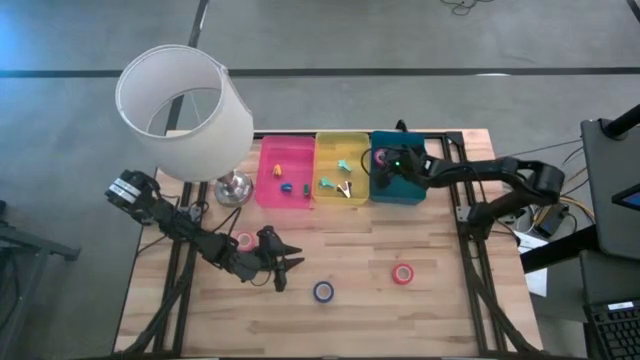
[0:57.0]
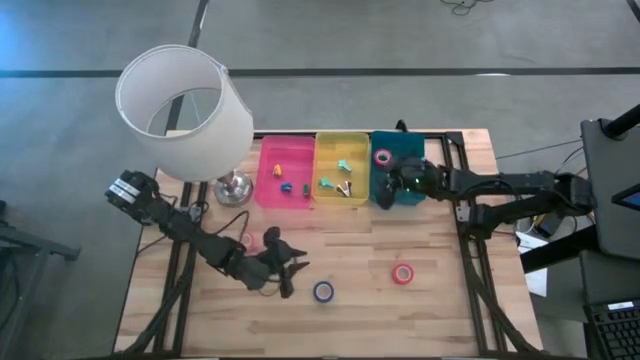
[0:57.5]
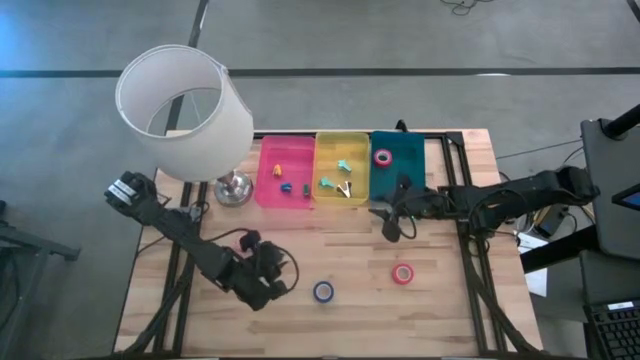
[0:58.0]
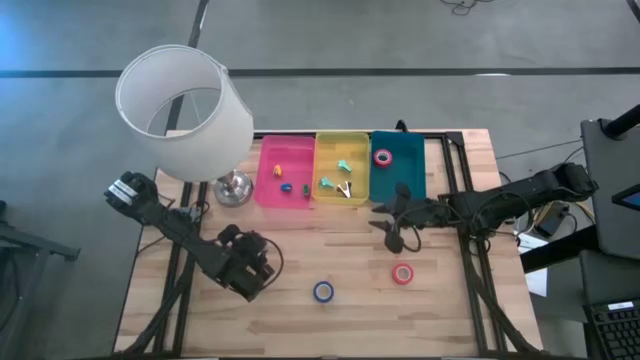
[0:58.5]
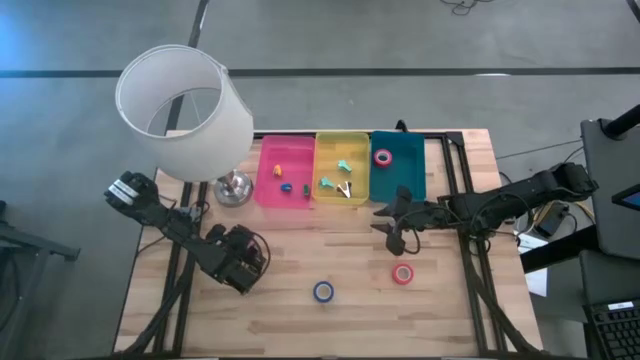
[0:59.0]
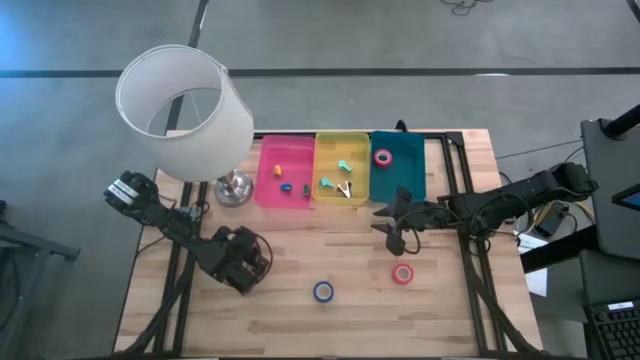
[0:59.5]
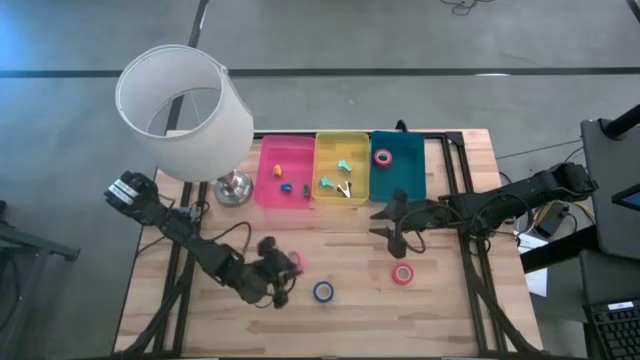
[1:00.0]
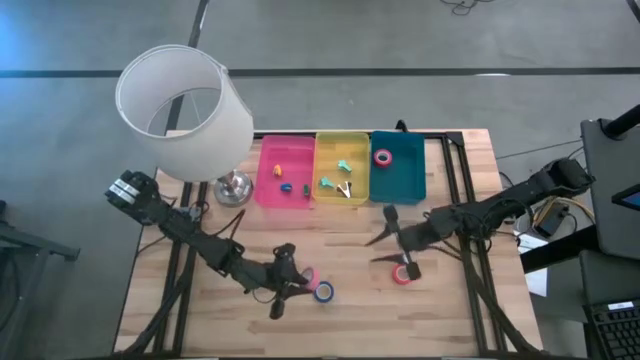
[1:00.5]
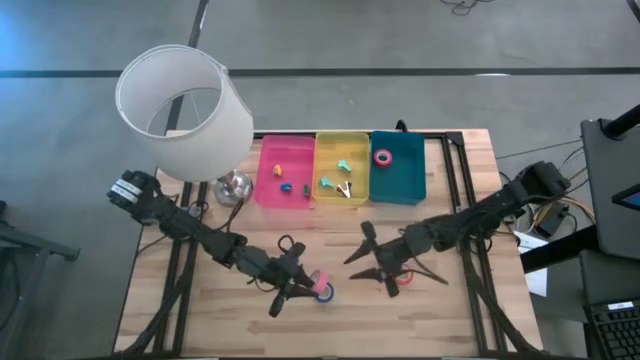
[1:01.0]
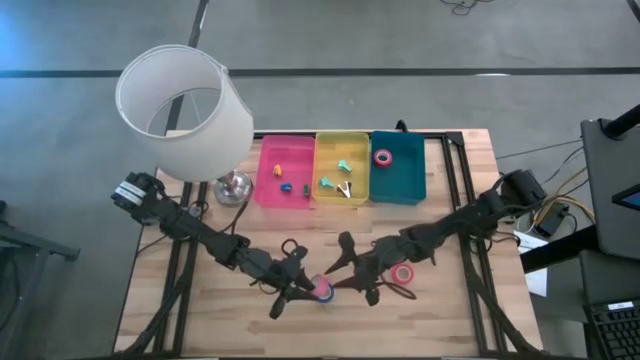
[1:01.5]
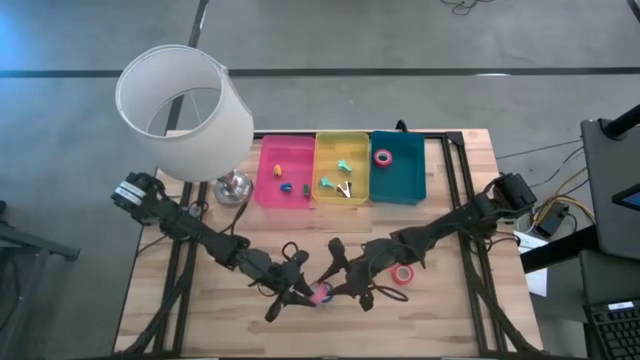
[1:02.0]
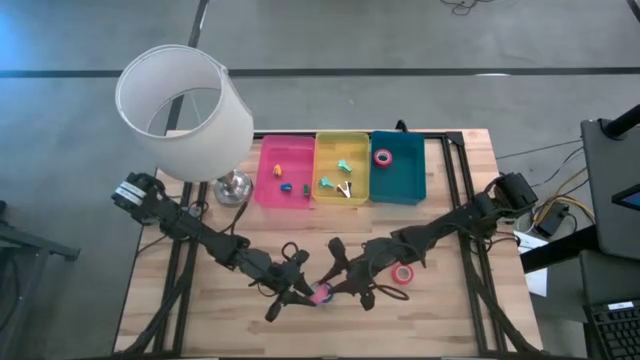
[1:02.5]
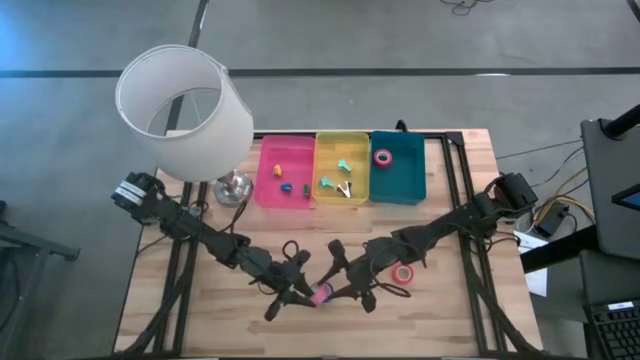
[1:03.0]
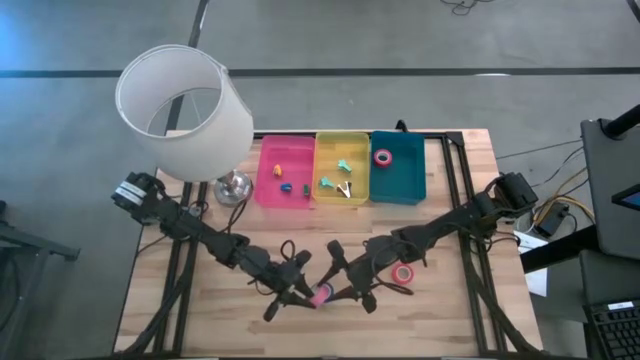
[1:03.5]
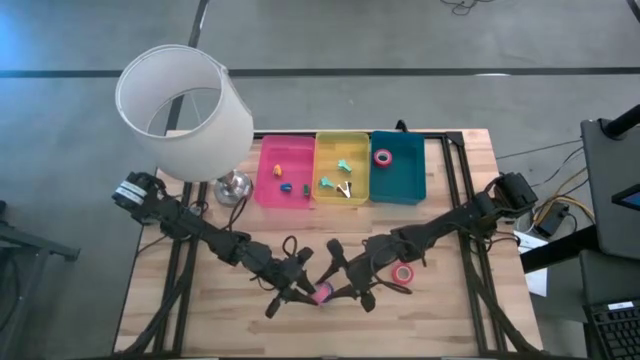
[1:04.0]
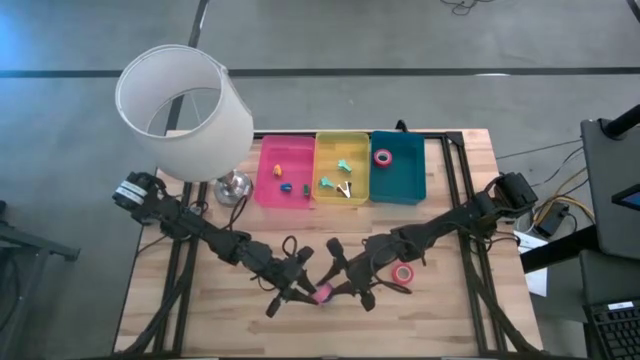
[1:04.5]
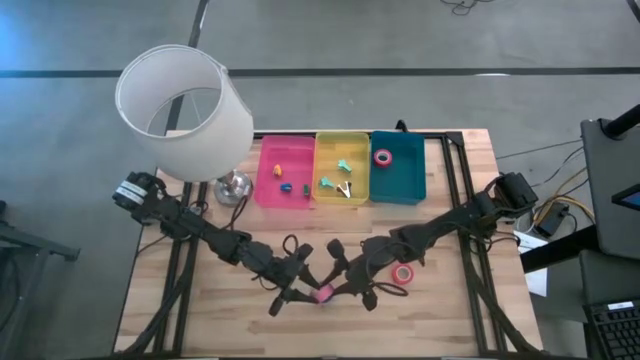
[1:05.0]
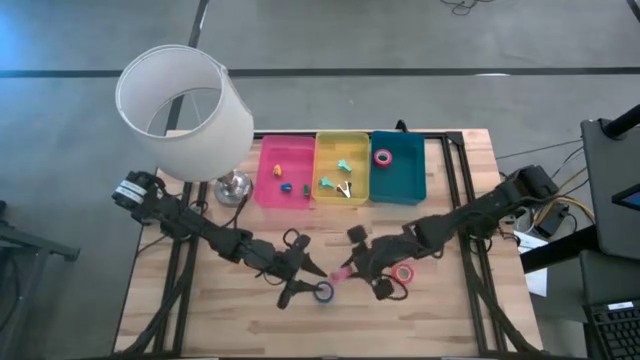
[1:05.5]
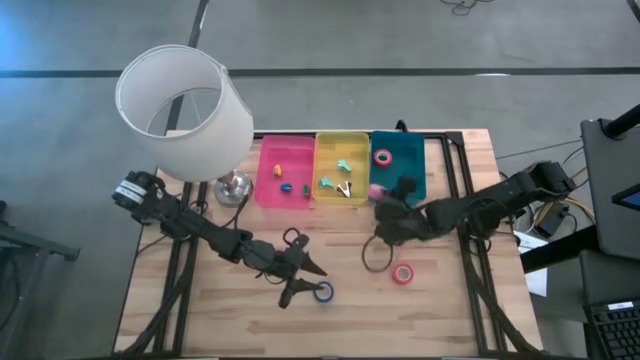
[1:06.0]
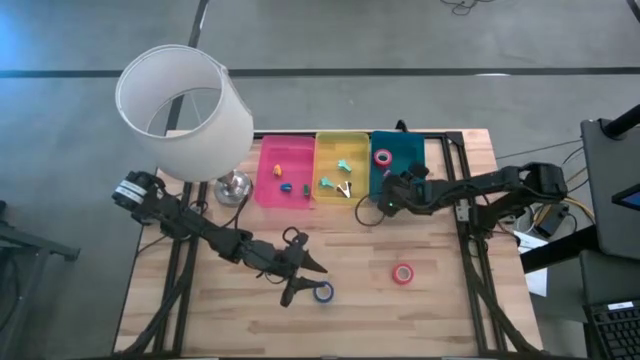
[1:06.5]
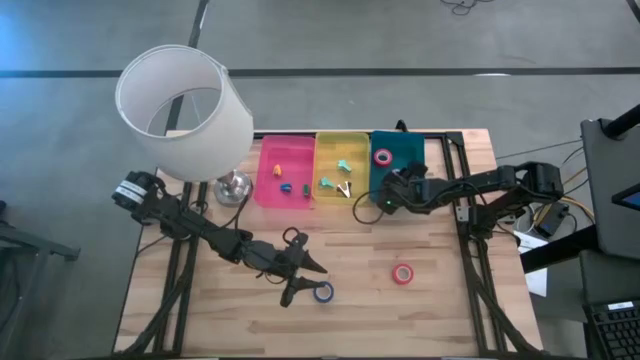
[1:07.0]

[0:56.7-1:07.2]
Task: Pick and place Stapler, Stapler remover, tape
Put the pink tape into the blue bin

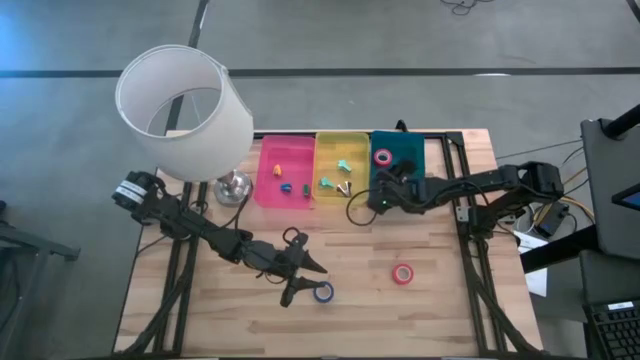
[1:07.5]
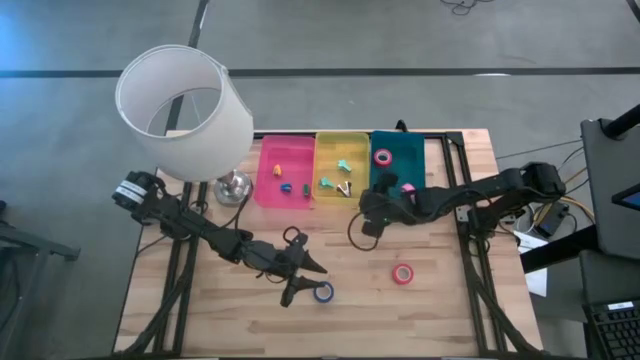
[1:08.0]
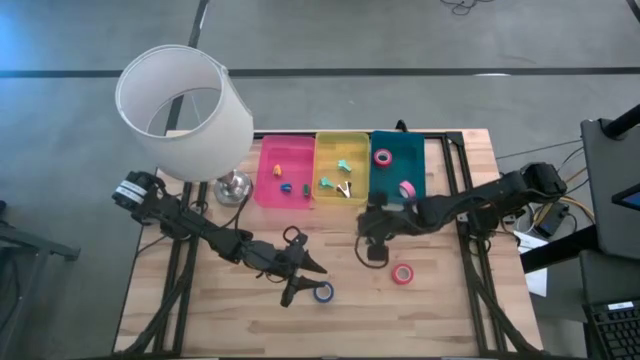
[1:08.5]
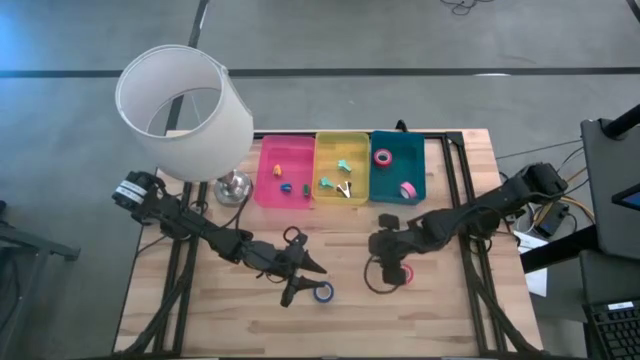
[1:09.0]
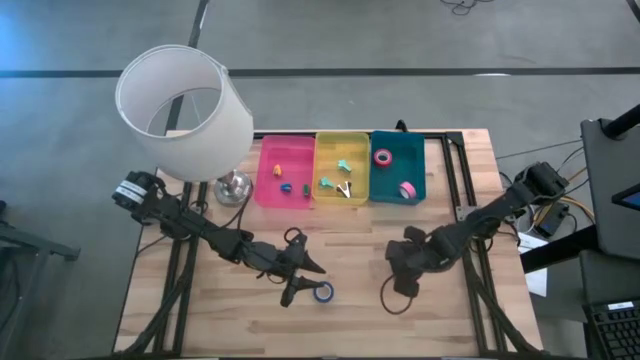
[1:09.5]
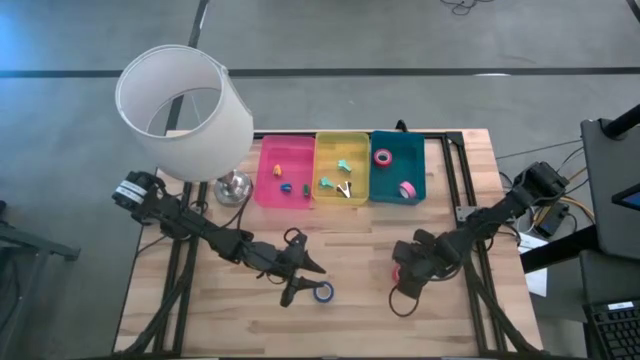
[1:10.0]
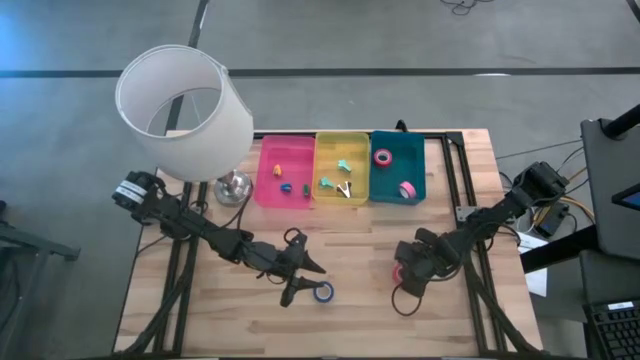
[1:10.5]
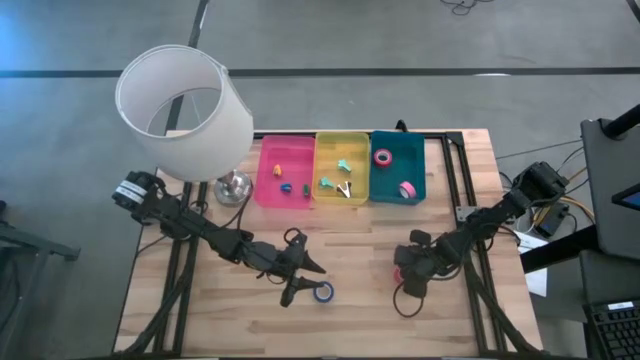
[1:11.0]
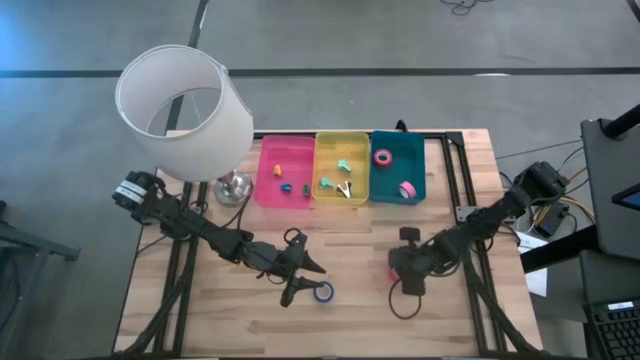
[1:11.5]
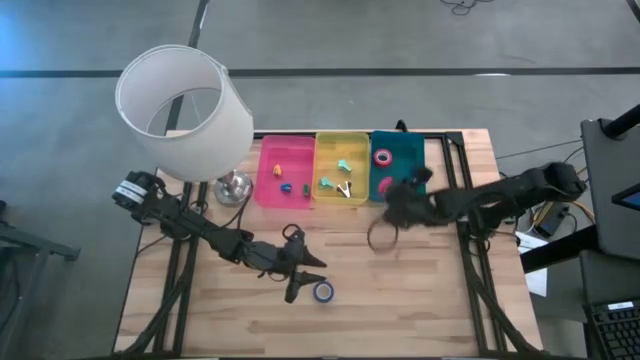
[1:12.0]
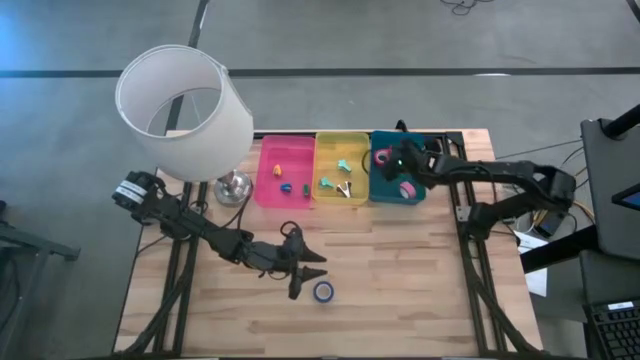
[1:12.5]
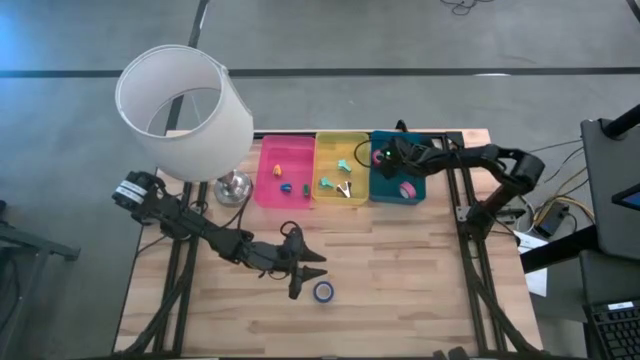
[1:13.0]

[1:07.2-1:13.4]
Put the orange tape into the blue bin

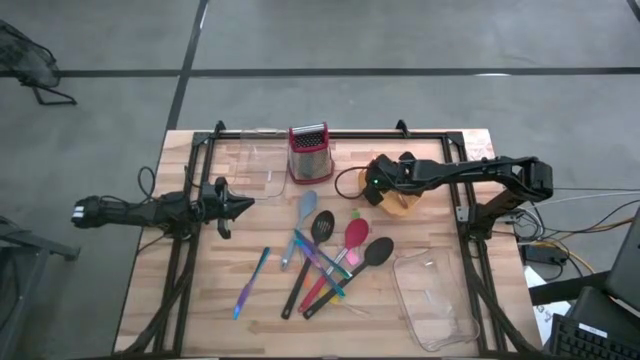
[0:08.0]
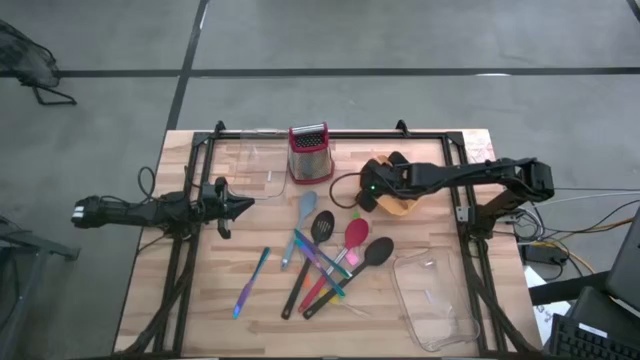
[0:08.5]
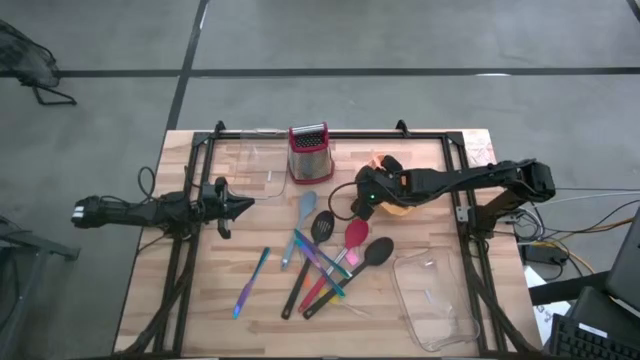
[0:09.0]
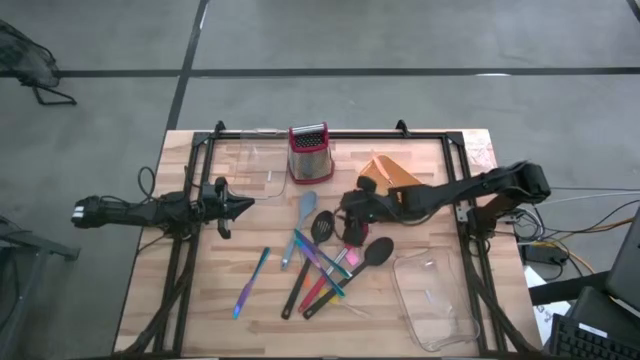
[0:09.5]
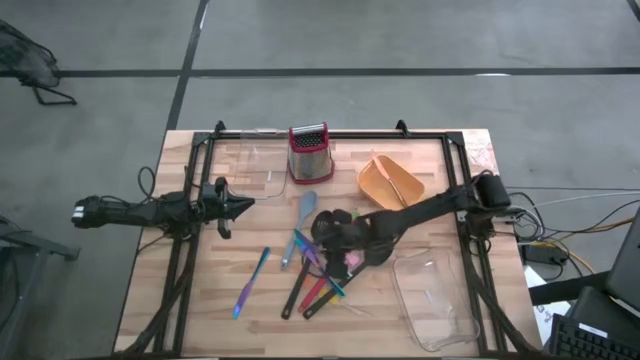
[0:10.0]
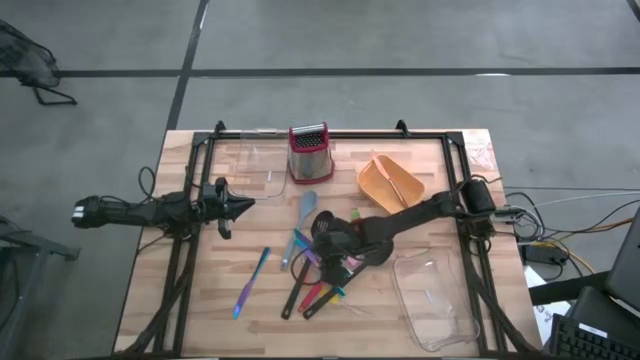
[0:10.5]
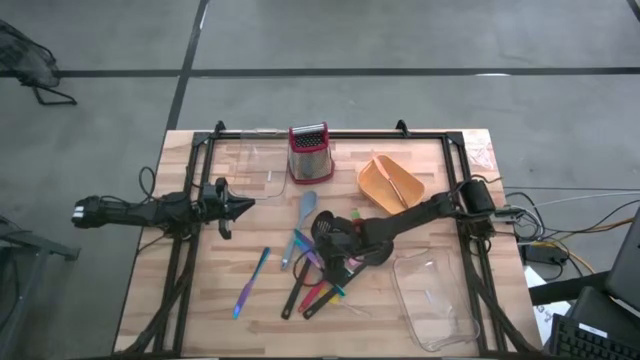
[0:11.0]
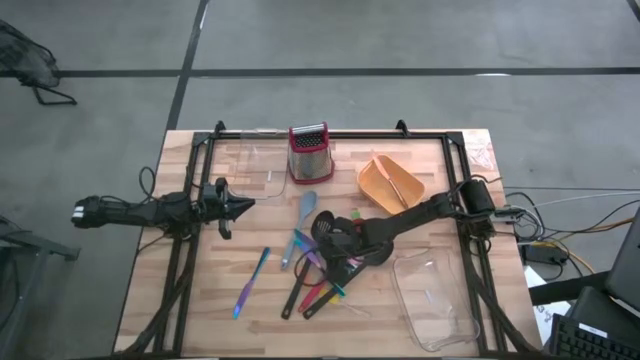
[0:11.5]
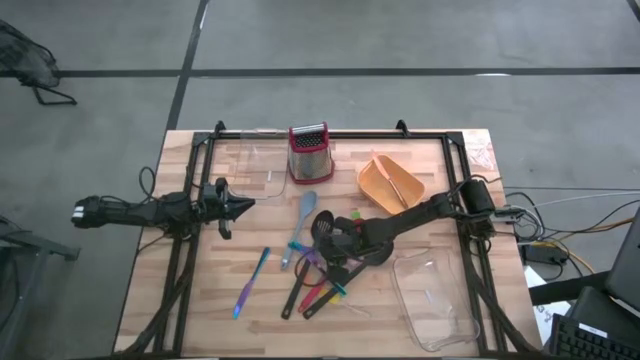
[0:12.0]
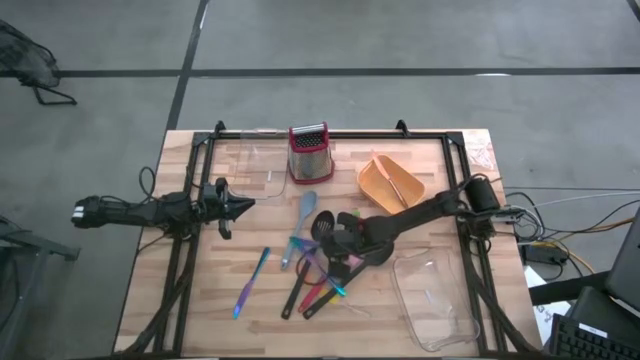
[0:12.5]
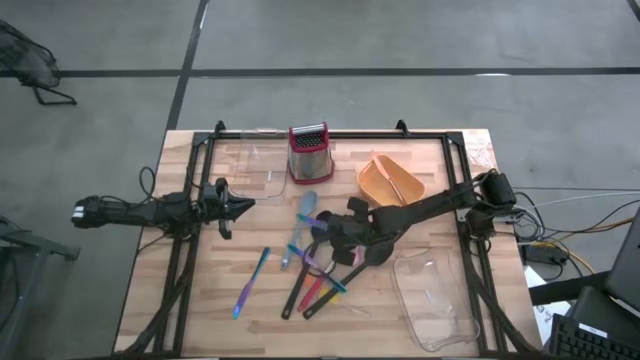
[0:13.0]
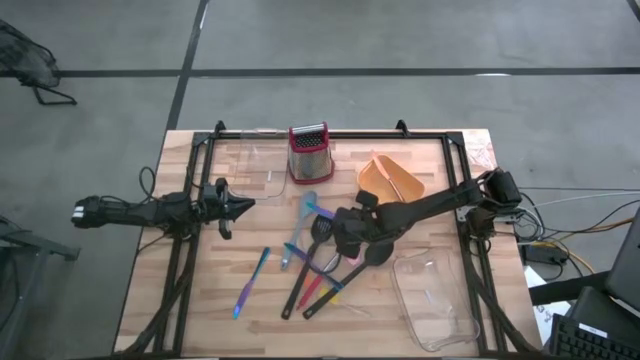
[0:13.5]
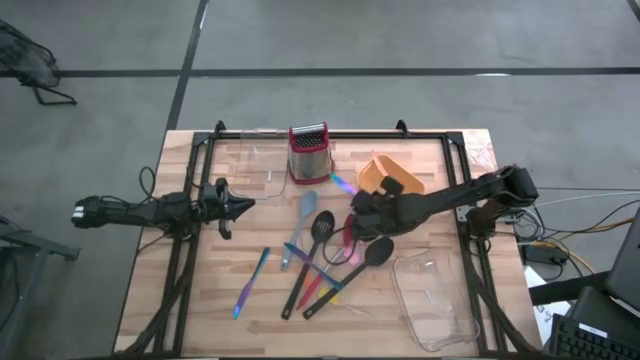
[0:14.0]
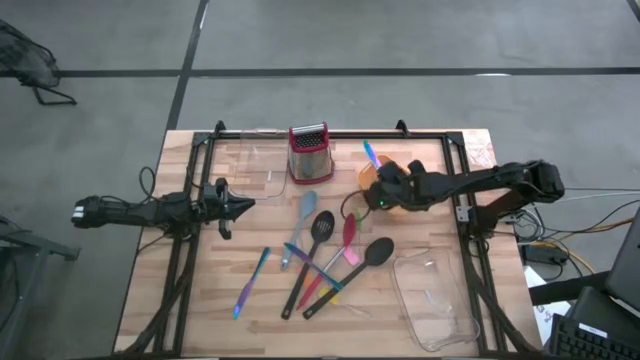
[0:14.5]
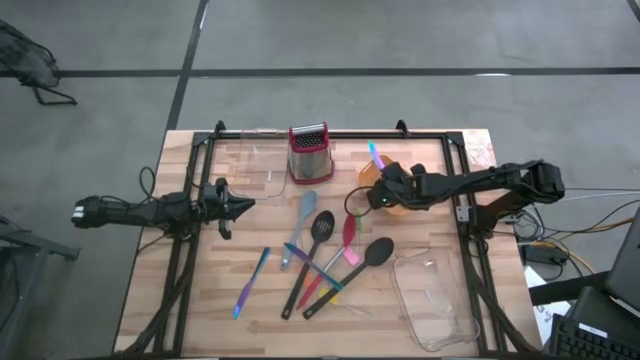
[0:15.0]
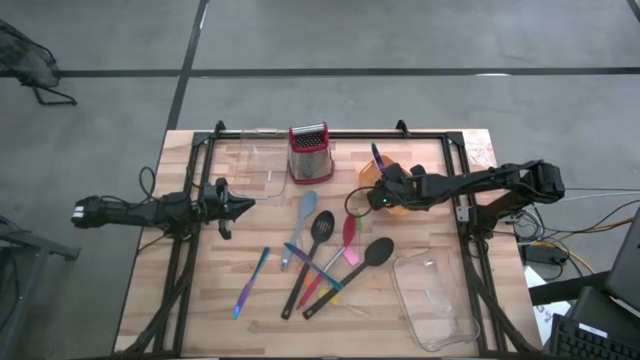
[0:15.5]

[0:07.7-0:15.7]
Task: Pick & Place Kitchen Items
Put the right blue table knife into the orange bin
